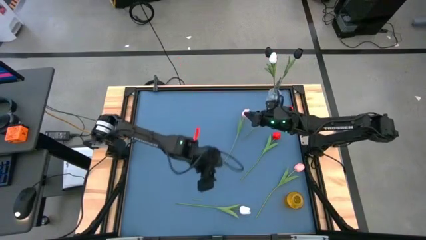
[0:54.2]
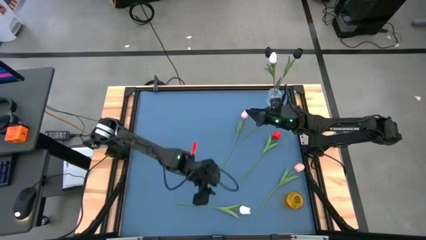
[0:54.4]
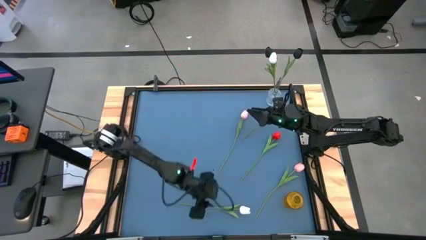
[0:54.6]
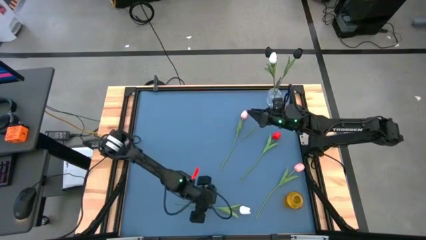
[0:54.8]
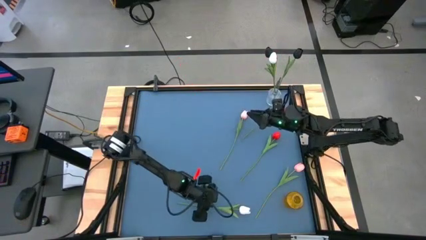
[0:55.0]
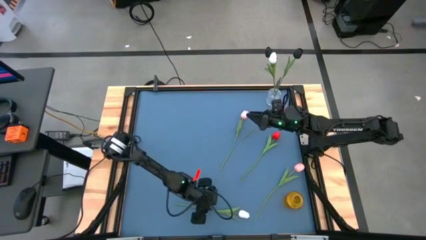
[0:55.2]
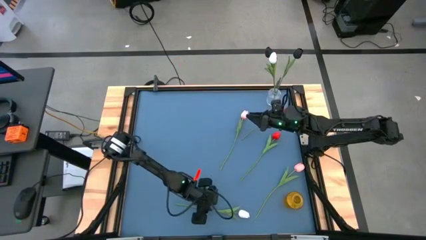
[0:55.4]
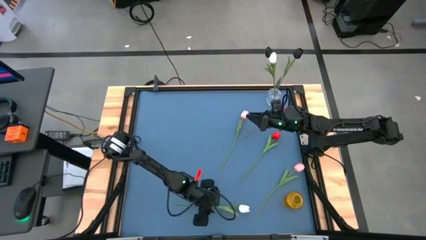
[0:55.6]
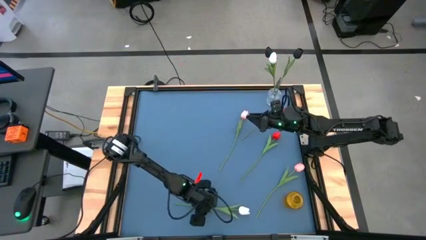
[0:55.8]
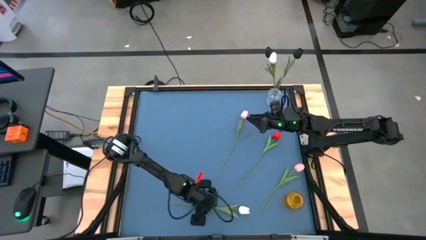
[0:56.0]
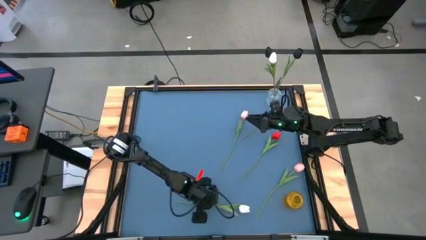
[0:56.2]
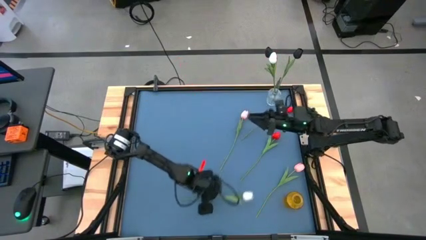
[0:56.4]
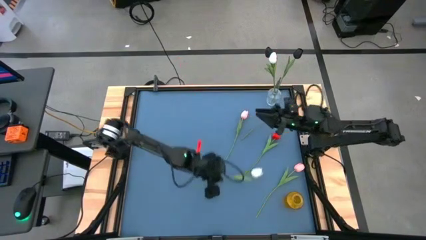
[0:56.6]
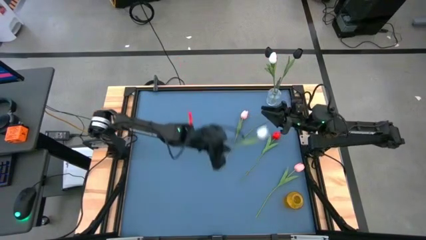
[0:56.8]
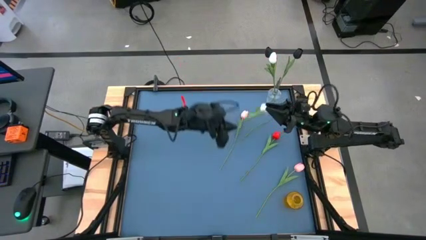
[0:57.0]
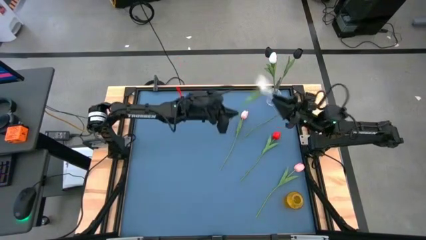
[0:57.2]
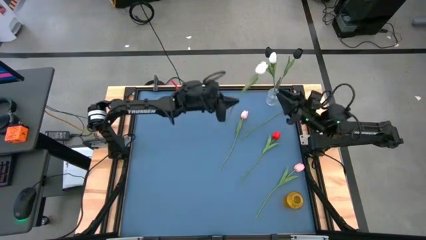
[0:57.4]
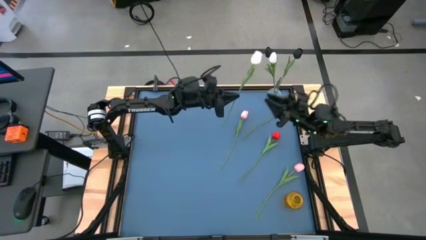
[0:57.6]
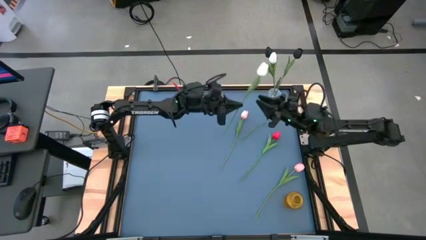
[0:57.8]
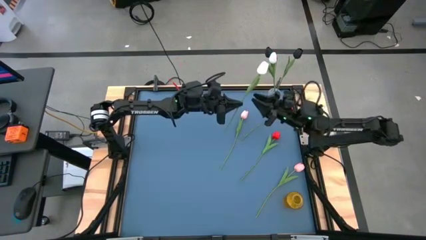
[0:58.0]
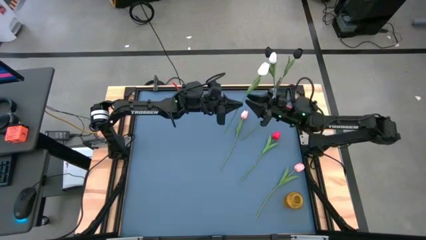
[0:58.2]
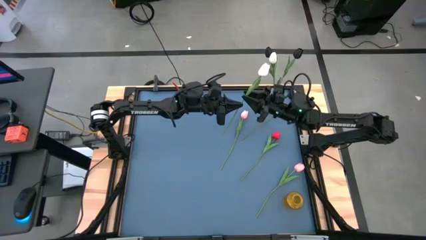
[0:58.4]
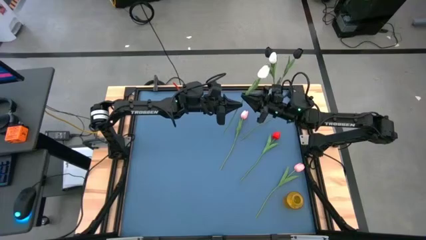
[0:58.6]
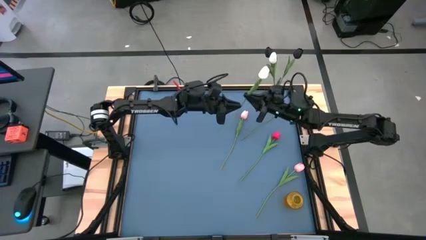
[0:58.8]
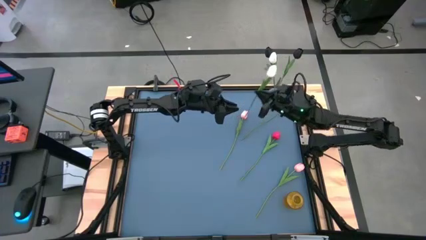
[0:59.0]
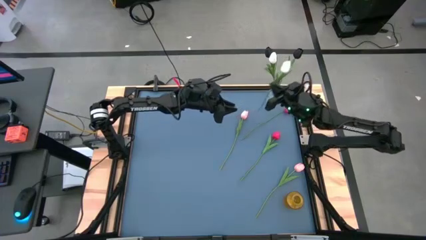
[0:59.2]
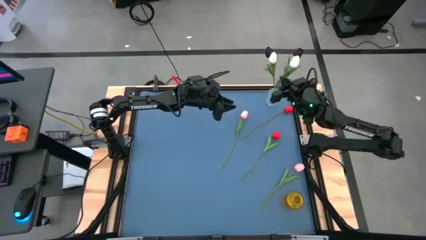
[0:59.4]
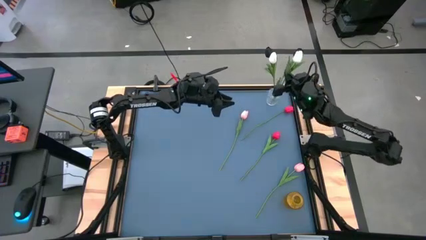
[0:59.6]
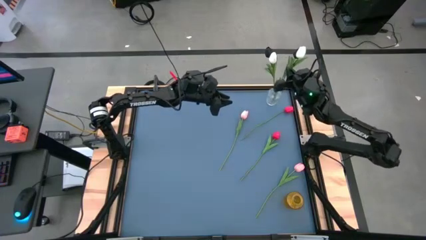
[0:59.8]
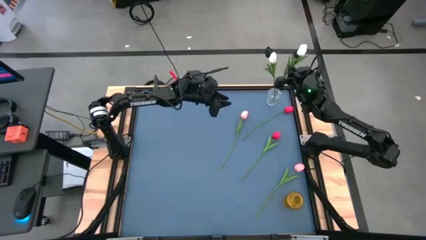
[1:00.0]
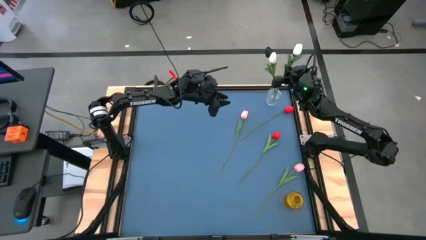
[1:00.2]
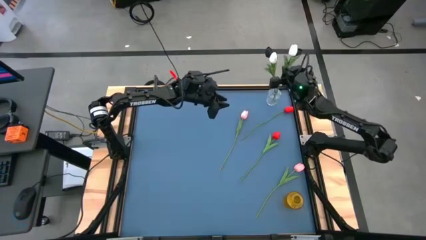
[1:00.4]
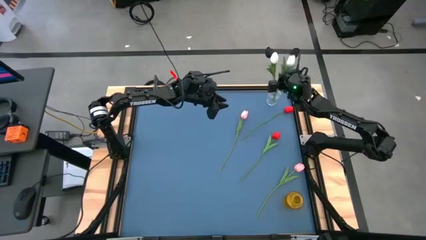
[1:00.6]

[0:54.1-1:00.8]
Task: Sort flowers into vase by color
Put the white flower into the transparent vase

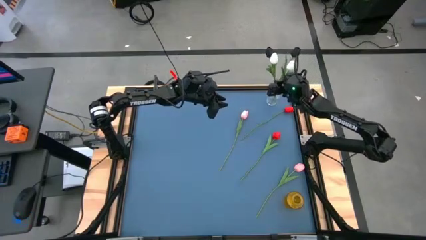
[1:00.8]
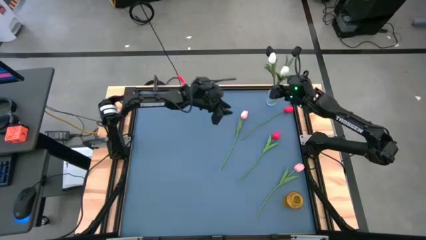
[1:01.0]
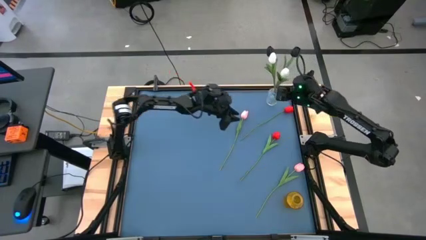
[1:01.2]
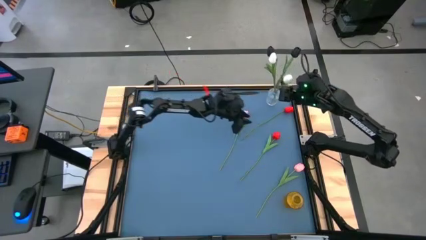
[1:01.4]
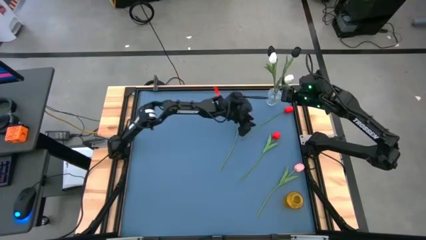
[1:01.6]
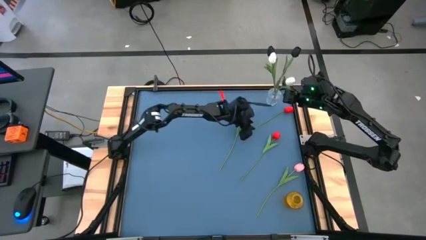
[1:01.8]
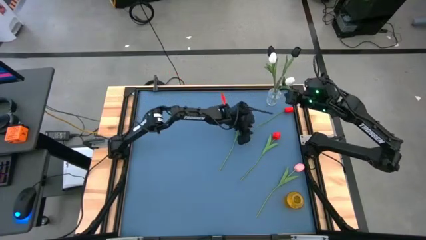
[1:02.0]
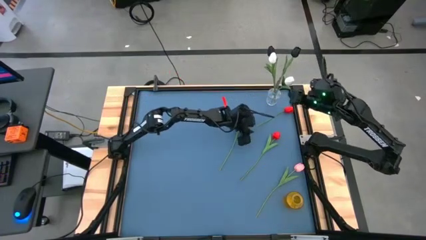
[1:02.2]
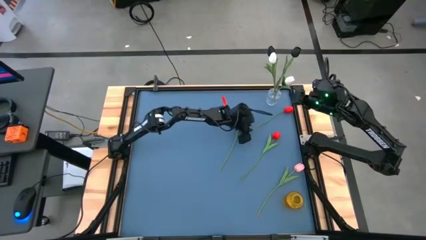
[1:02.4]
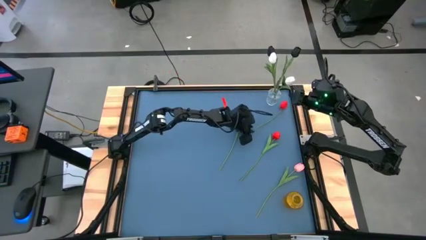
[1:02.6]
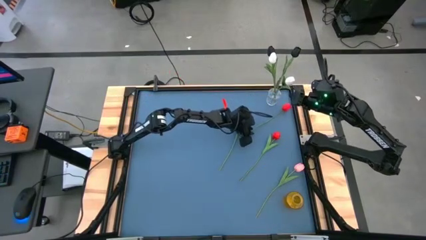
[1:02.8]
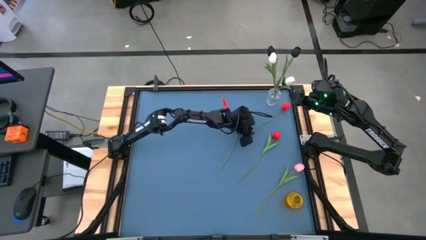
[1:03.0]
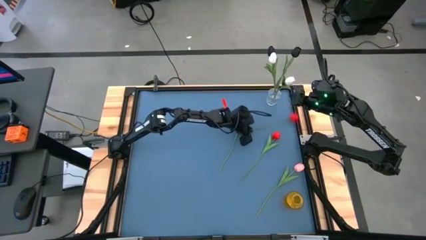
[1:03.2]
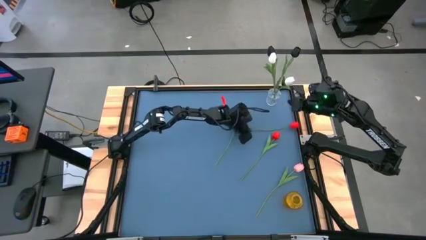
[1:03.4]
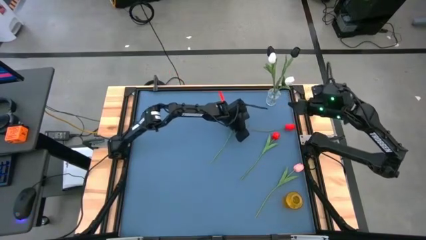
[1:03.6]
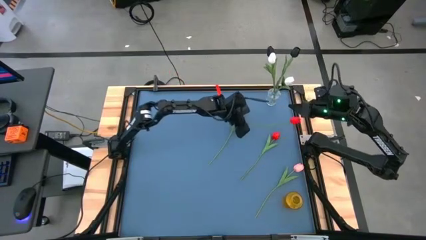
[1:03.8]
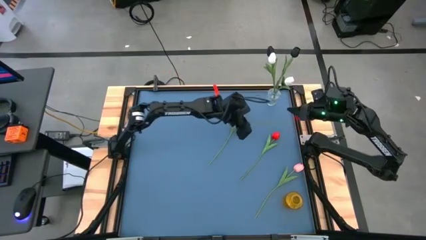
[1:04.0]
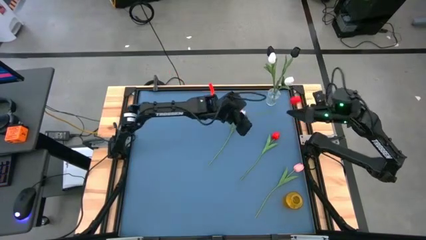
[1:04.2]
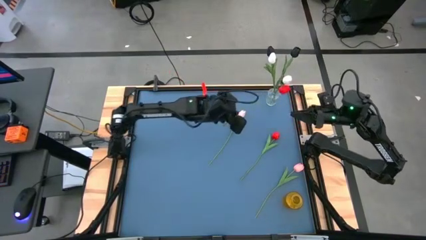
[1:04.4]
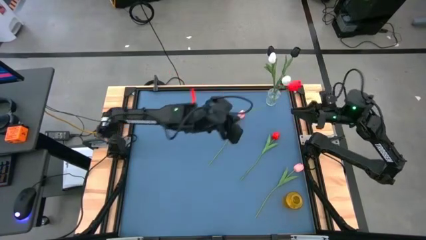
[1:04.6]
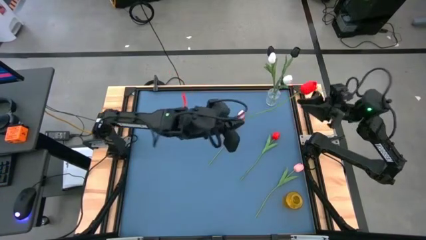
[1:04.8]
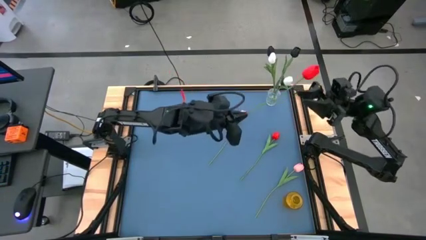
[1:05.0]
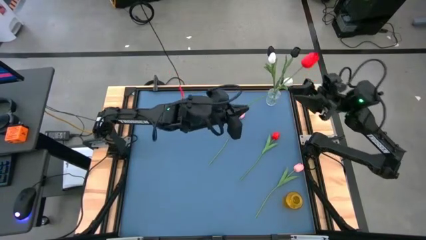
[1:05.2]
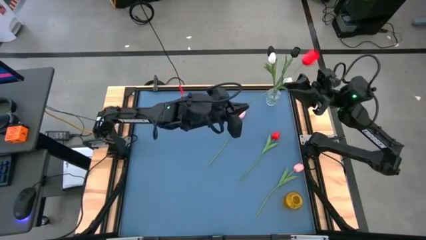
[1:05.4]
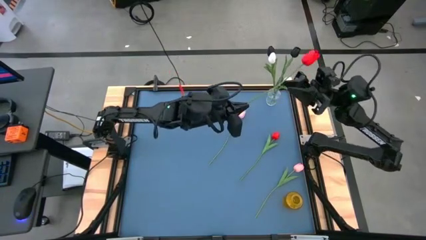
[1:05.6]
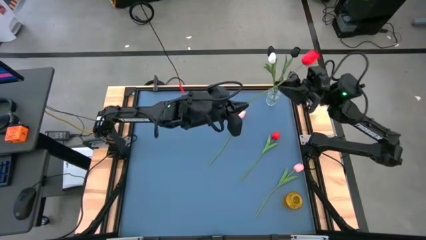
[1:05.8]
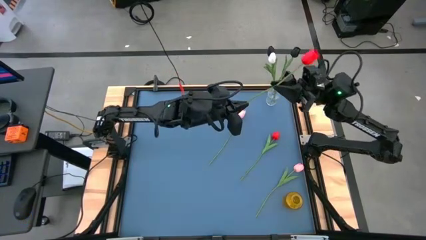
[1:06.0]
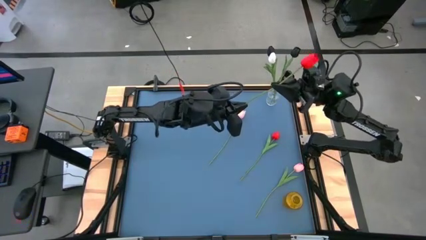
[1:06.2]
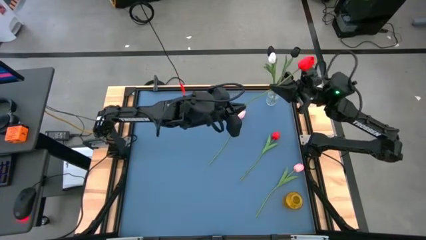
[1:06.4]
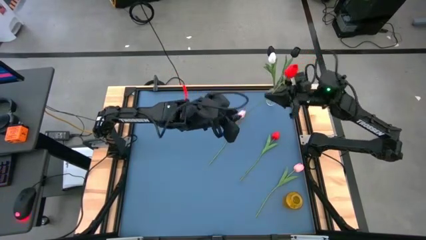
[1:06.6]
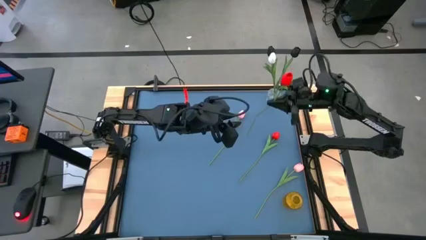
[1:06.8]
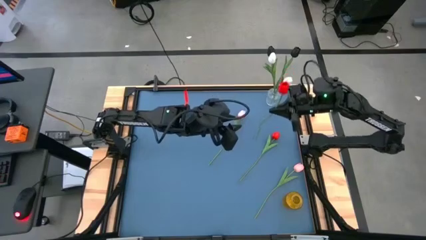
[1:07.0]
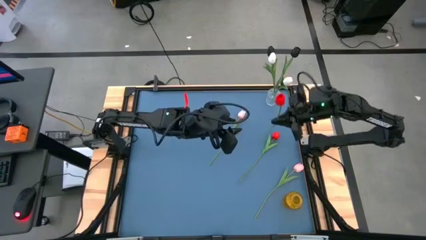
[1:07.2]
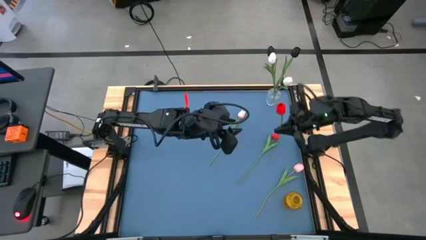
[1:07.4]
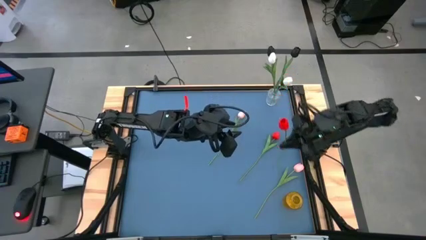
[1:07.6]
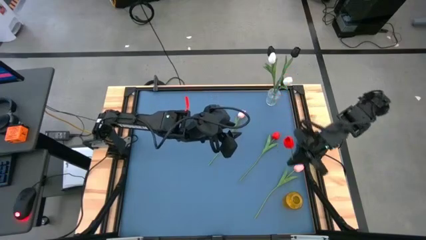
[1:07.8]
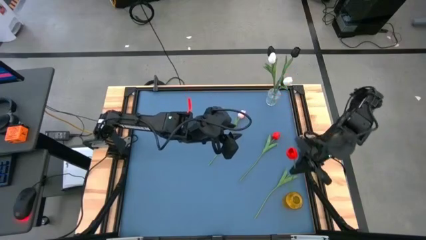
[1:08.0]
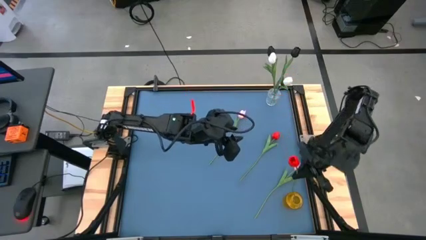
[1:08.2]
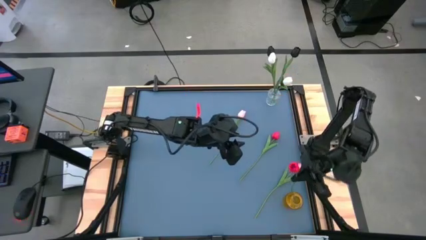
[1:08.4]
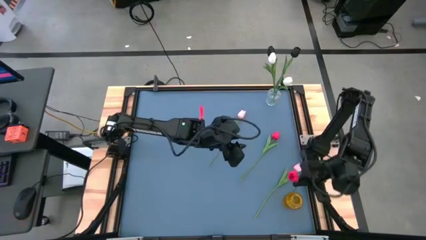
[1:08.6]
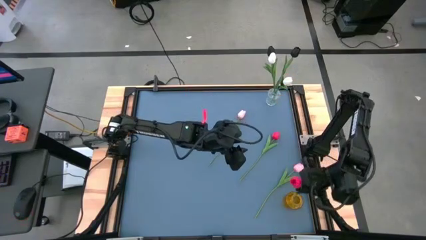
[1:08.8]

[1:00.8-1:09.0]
Put the top red flower into the yellow vase
